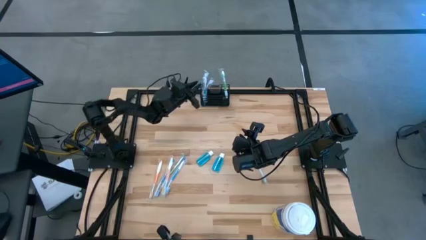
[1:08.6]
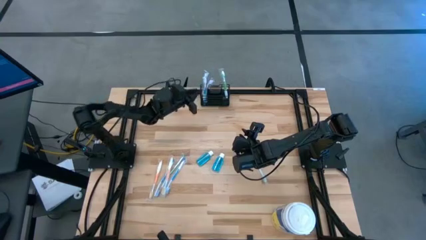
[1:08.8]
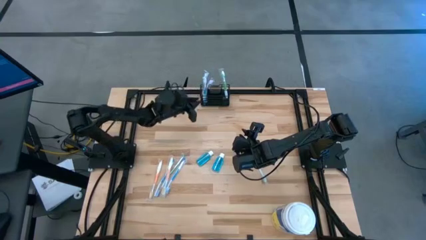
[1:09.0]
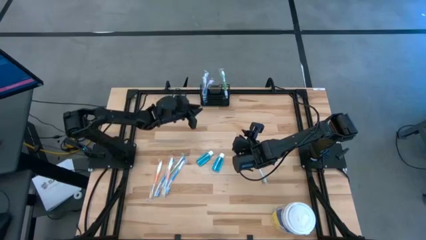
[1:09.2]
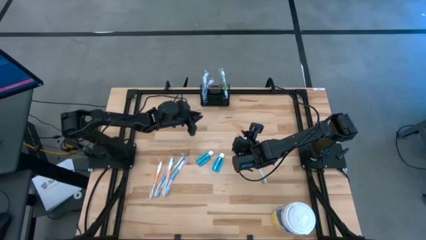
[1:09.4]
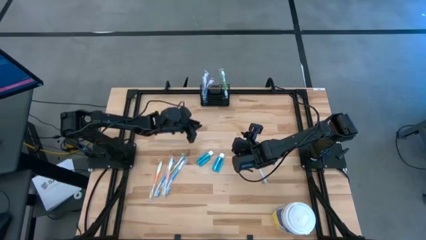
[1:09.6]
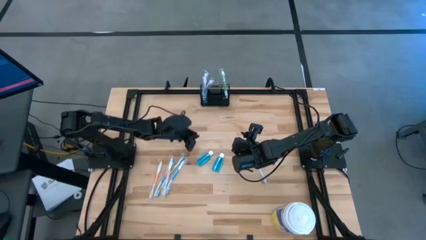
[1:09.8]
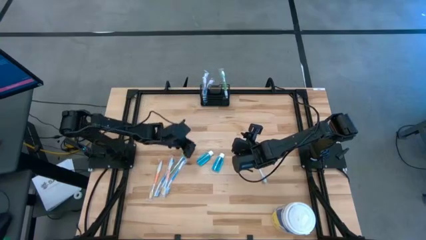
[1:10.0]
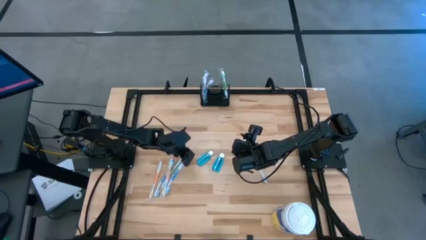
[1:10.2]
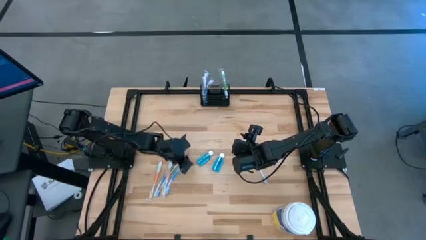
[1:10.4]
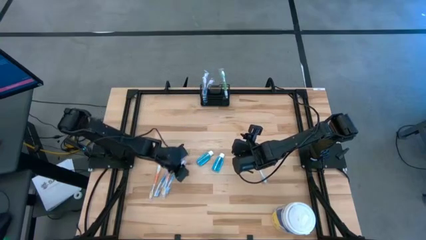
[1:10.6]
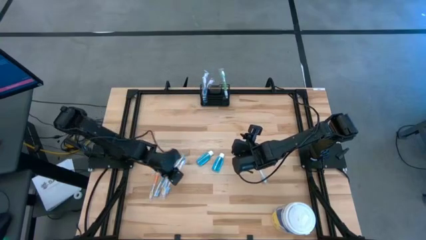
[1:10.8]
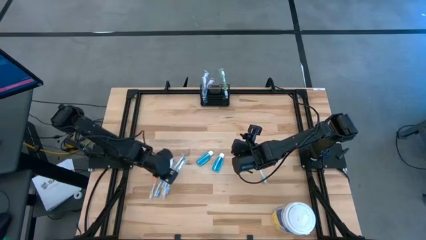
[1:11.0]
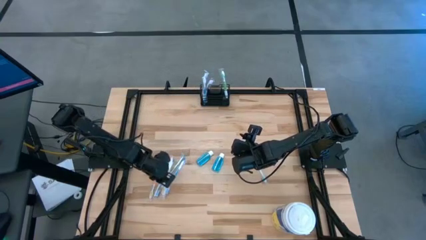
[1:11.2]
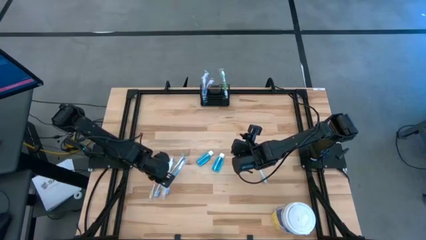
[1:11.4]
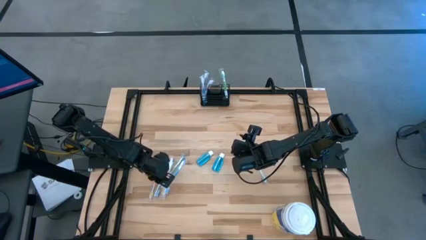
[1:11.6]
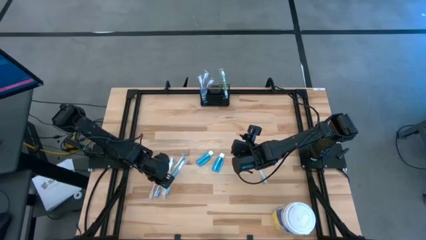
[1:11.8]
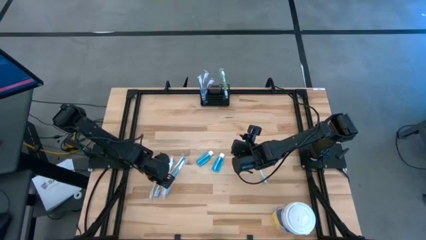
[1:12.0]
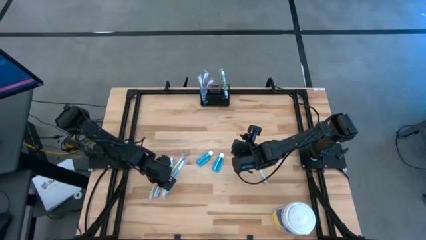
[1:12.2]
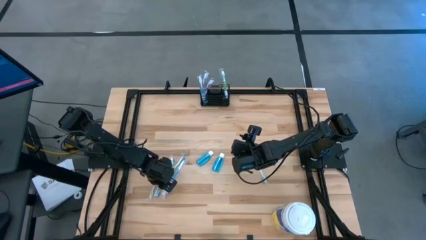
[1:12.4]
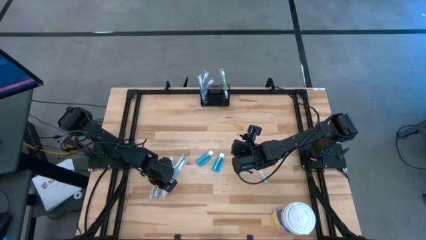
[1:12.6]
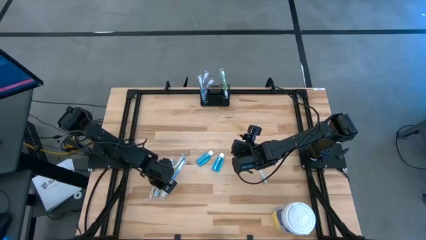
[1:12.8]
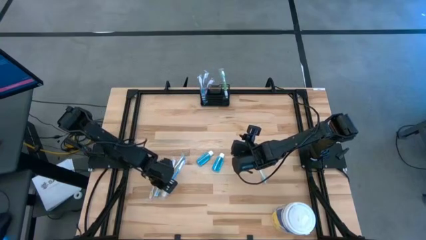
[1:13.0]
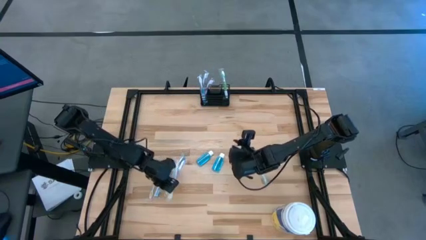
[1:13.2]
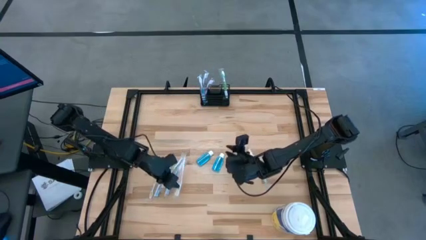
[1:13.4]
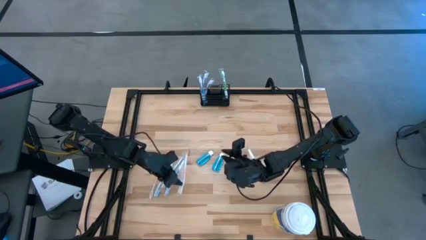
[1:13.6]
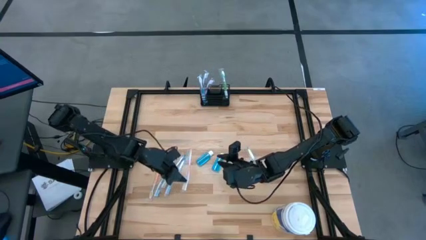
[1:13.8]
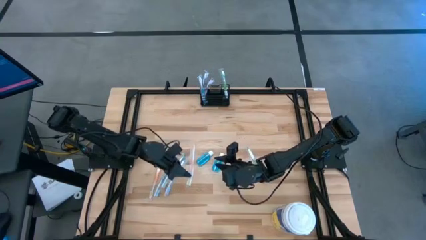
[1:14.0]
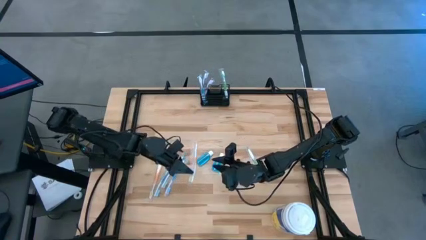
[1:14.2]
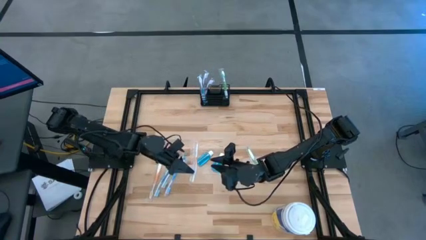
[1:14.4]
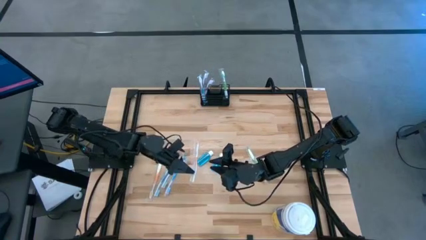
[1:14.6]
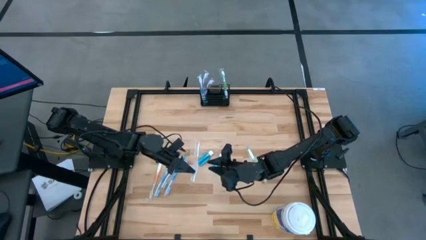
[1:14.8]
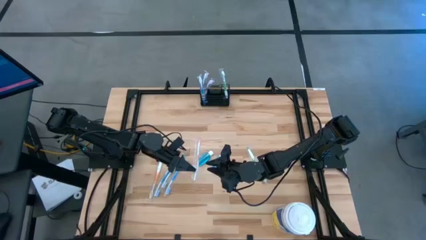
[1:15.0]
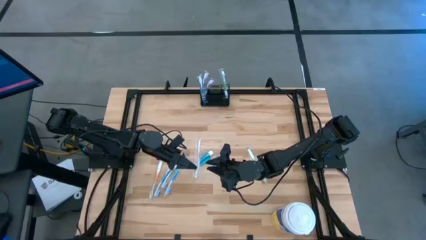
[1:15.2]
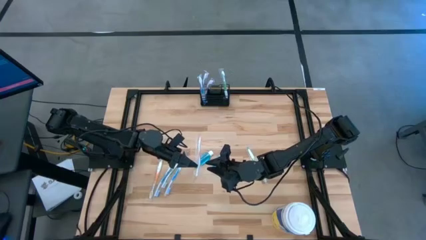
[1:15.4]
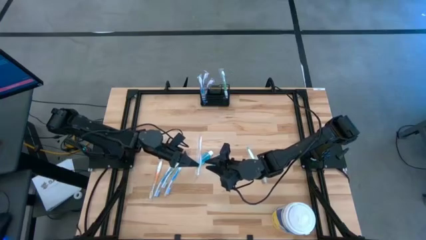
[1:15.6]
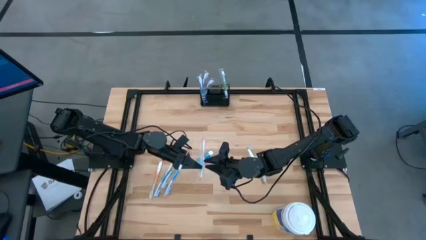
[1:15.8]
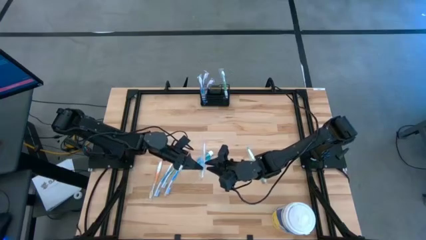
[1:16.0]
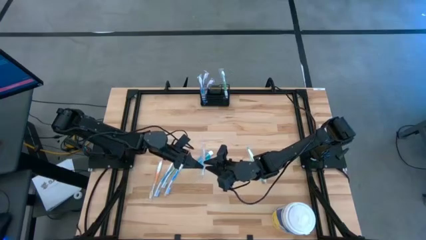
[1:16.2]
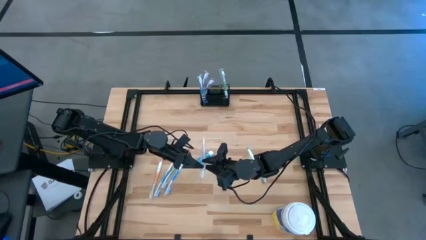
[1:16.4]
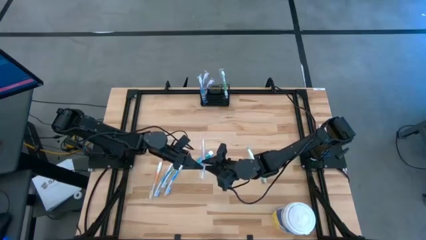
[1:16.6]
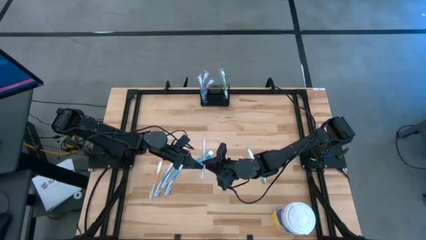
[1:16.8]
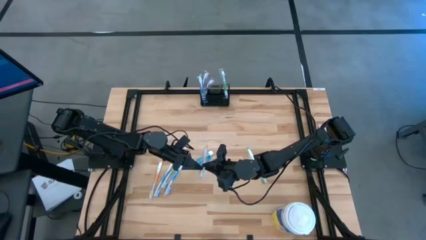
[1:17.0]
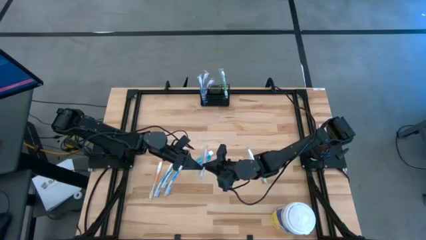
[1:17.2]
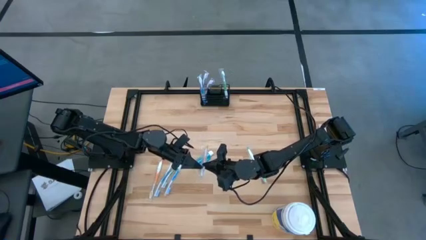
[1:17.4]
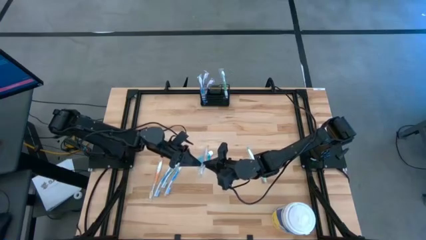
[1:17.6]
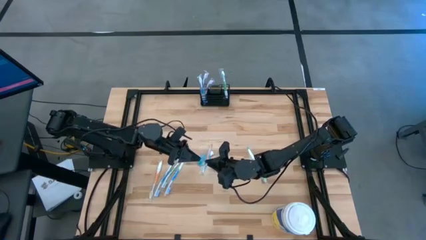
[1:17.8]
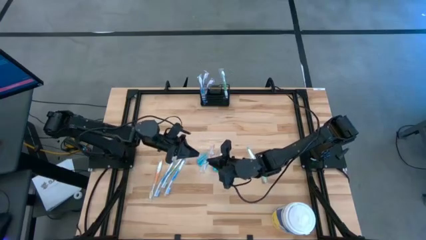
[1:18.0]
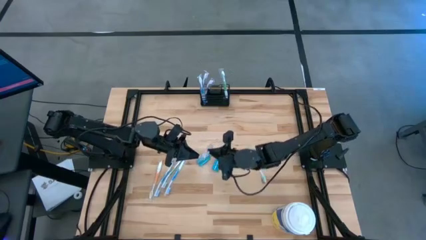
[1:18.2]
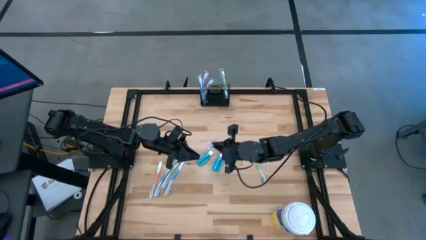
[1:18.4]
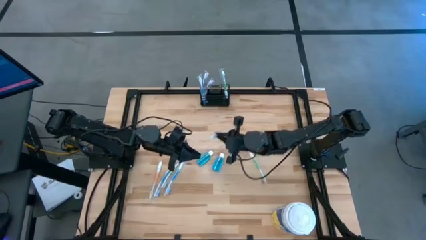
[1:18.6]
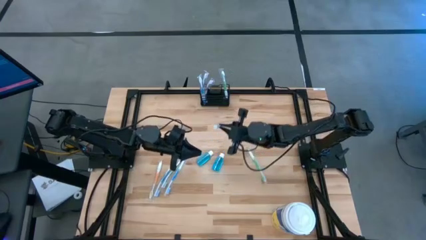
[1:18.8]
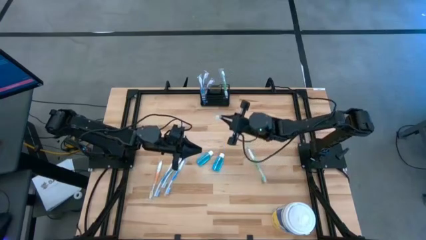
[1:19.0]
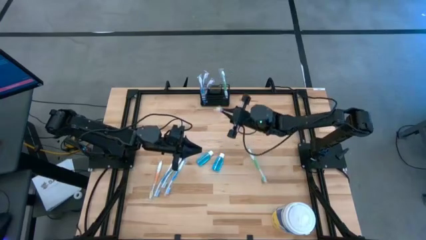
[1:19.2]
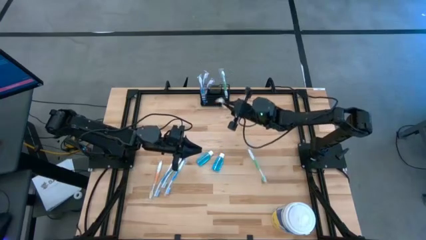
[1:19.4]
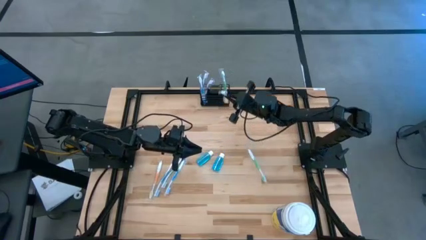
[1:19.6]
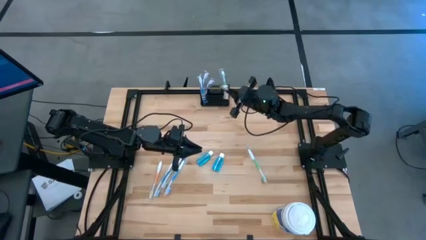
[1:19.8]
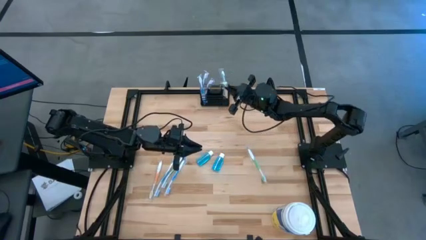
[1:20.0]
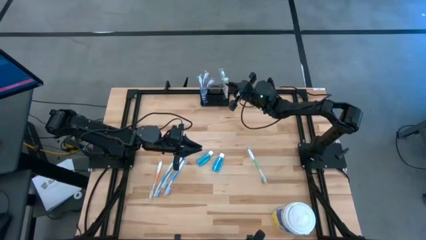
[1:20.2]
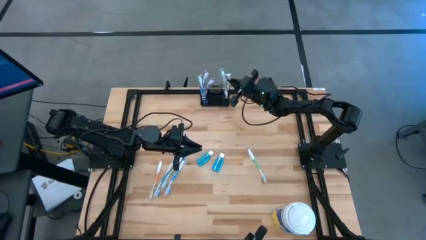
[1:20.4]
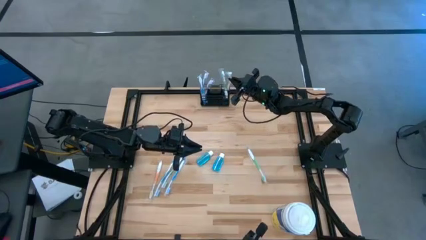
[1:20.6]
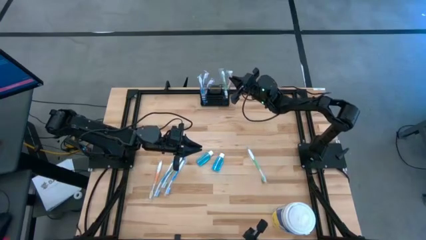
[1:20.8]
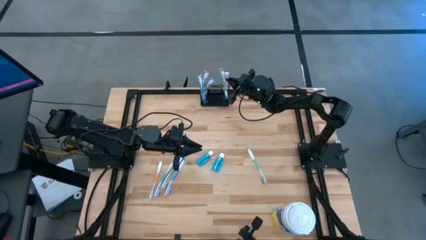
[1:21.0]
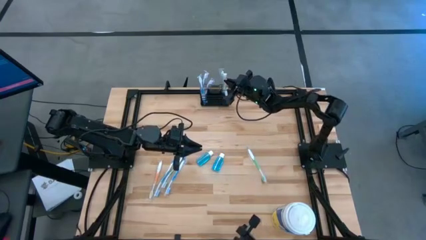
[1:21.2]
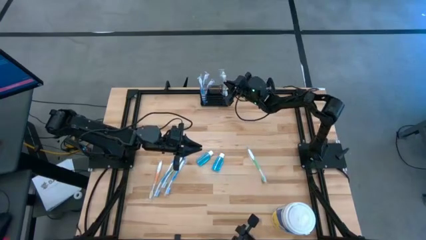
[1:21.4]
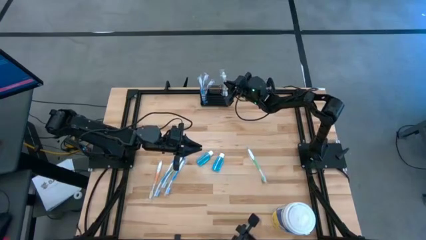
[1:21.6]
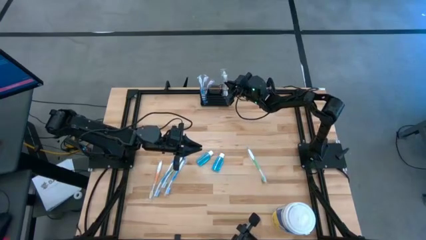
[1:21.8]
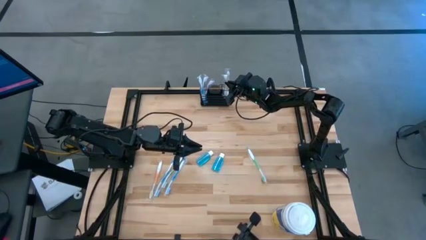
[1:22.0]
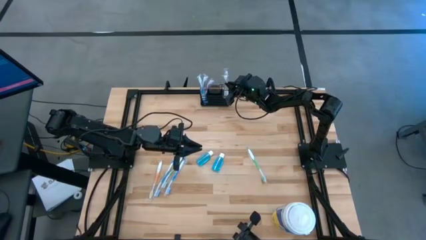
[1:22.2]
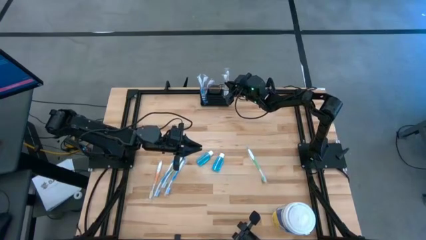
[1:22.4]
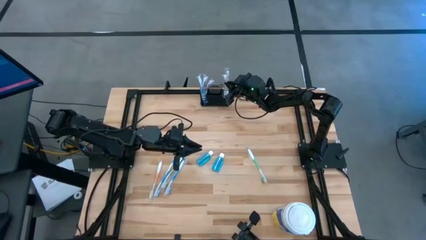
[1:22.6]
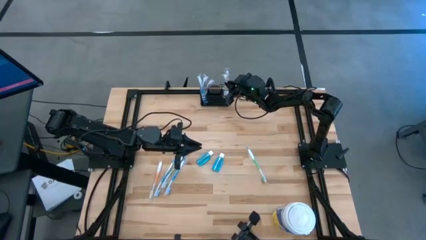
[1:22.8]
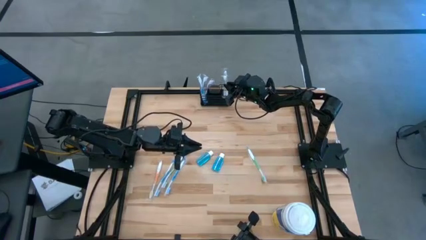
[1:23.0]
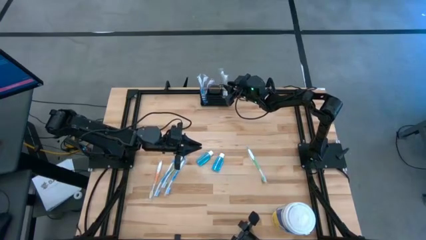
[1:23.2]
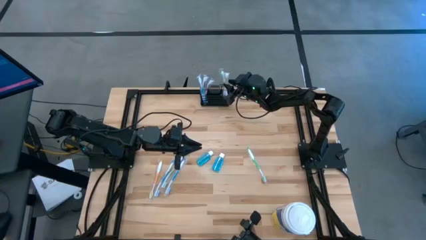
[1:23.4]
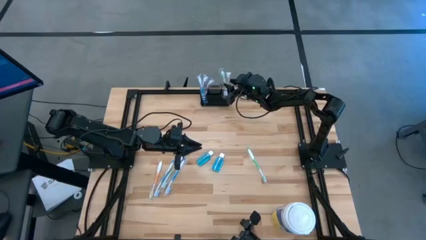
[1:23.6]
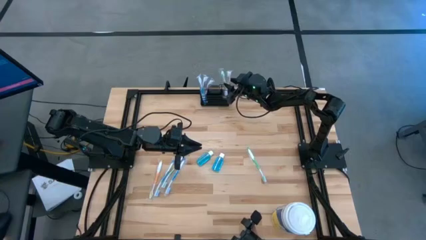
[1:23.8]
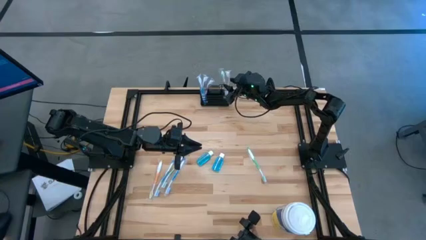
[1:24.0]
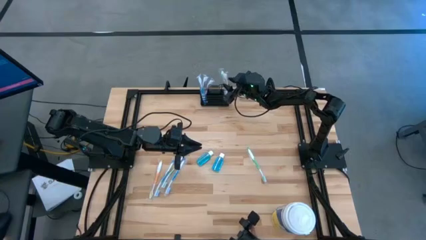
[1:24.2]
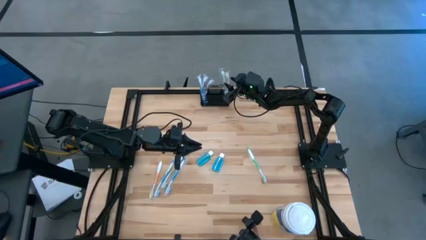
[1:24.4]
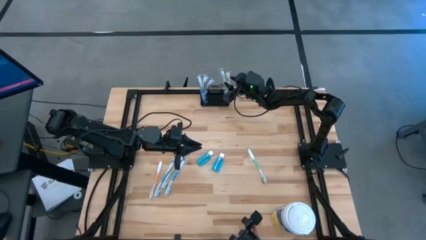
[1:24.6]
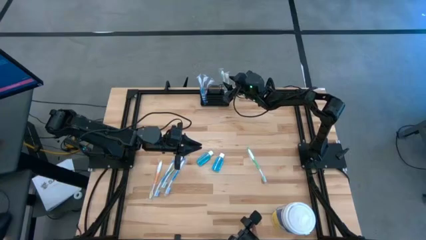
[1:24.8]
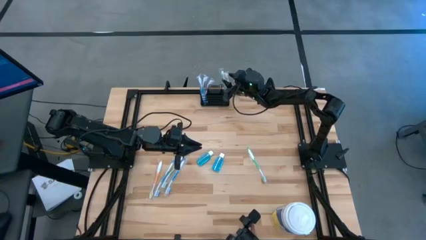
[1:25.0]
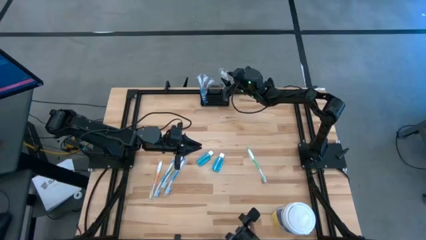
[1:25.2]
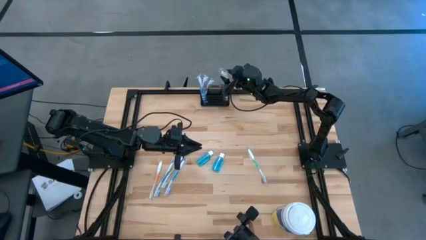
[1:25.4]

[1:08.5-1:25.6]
Task: Pick & Place toothbrushing station
Put the right orange toothbrush into the black wire organizer
